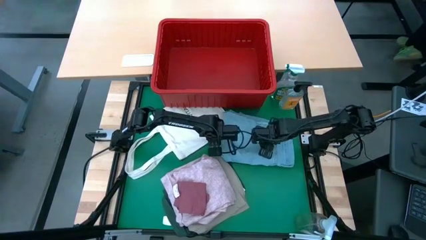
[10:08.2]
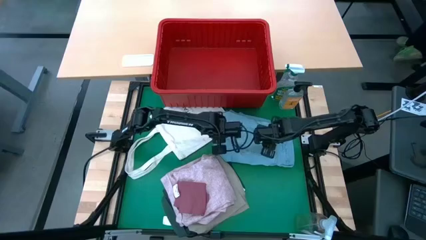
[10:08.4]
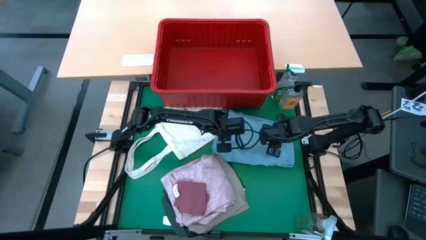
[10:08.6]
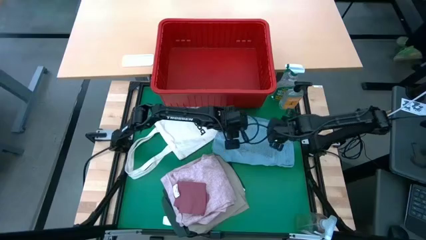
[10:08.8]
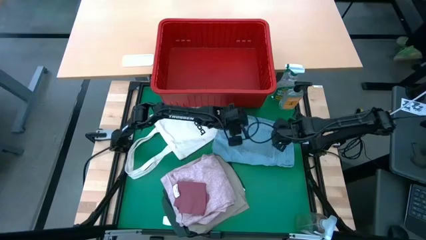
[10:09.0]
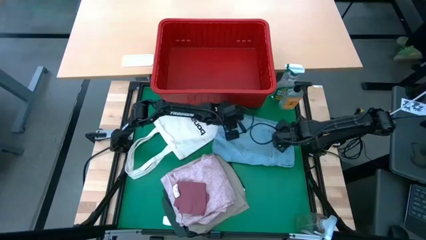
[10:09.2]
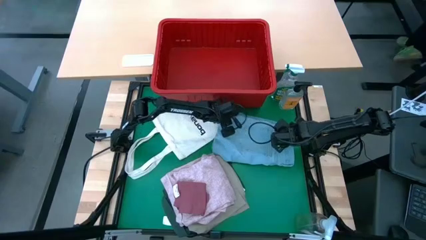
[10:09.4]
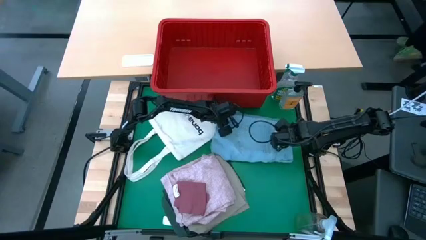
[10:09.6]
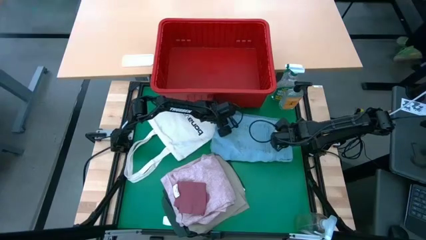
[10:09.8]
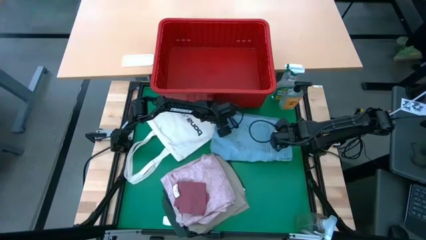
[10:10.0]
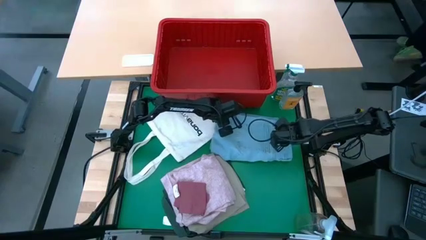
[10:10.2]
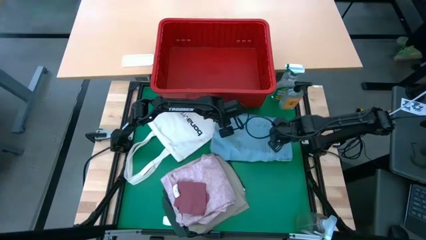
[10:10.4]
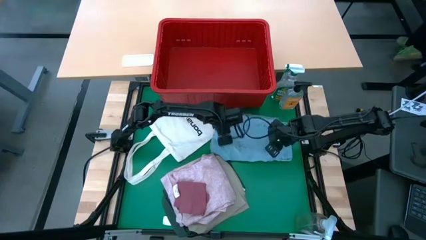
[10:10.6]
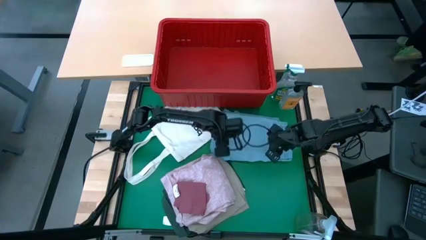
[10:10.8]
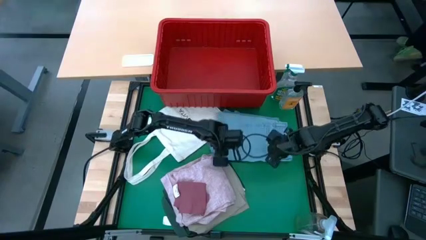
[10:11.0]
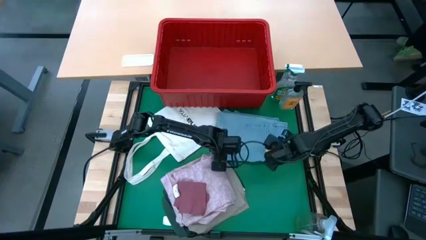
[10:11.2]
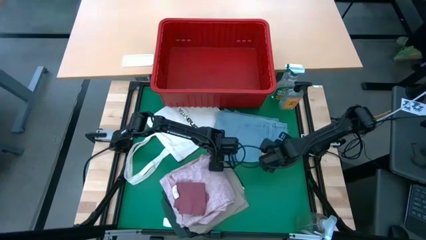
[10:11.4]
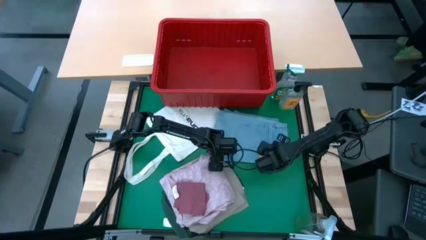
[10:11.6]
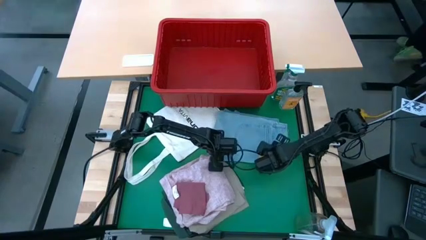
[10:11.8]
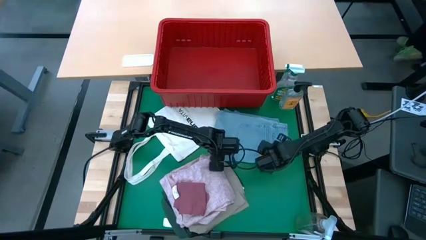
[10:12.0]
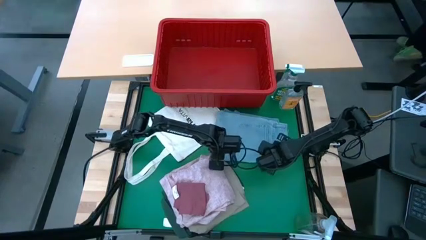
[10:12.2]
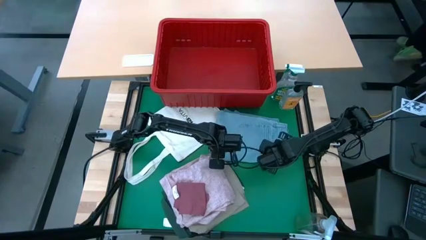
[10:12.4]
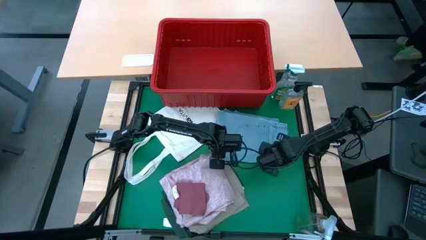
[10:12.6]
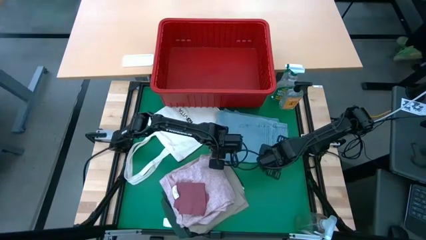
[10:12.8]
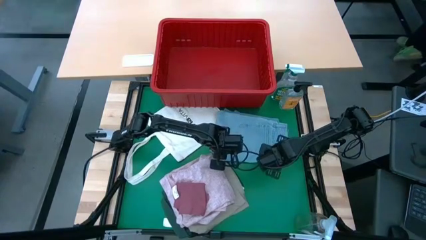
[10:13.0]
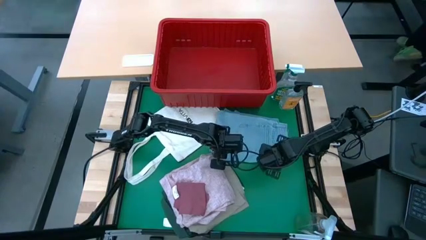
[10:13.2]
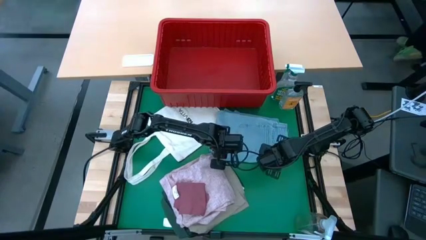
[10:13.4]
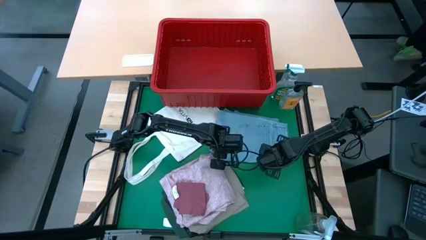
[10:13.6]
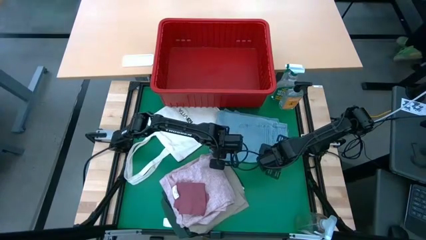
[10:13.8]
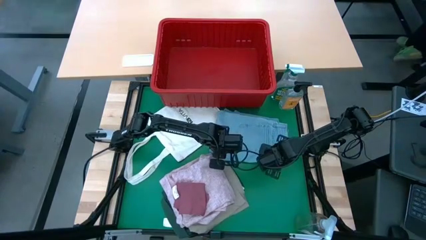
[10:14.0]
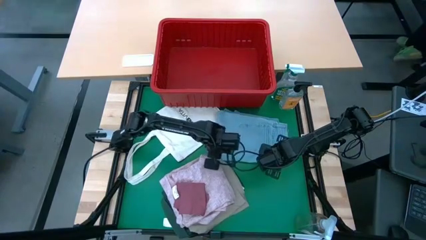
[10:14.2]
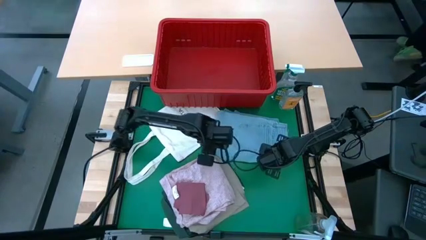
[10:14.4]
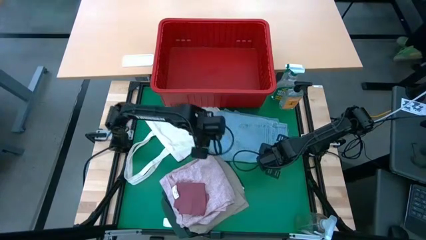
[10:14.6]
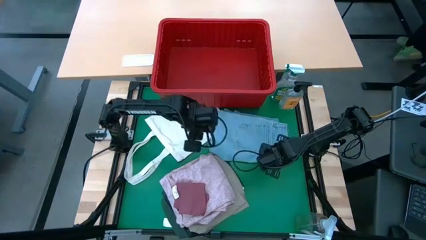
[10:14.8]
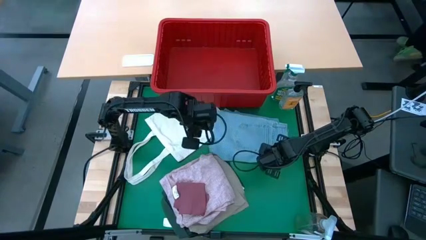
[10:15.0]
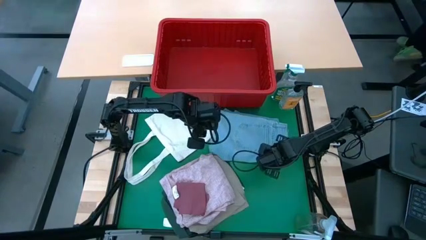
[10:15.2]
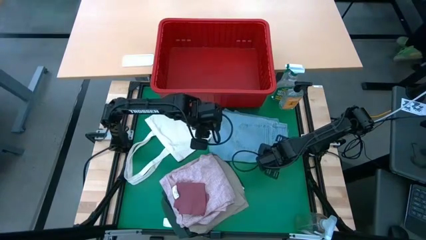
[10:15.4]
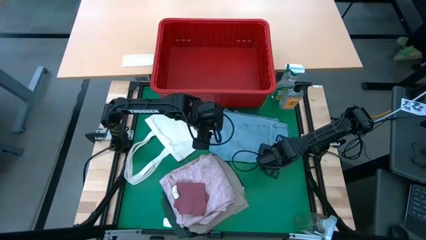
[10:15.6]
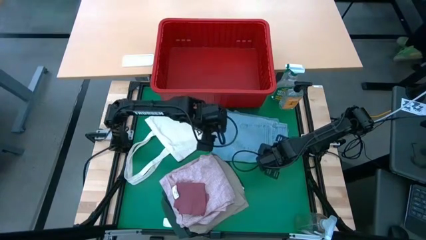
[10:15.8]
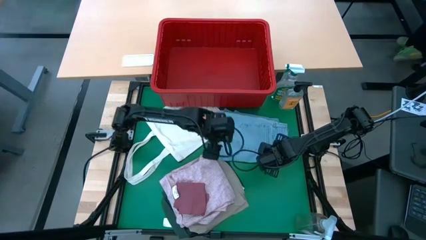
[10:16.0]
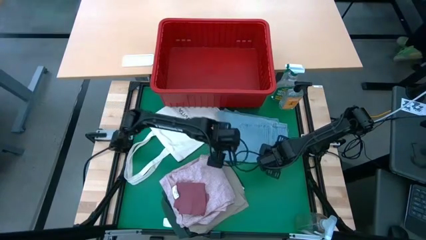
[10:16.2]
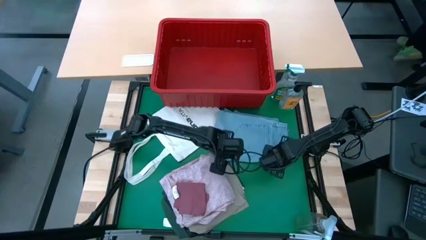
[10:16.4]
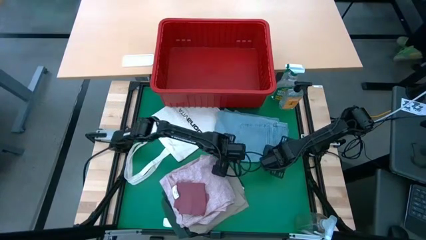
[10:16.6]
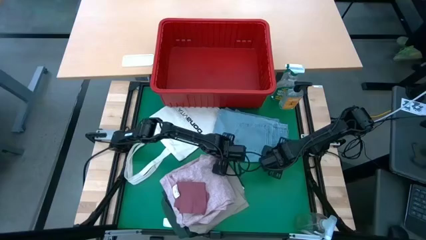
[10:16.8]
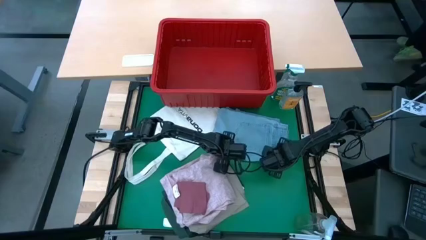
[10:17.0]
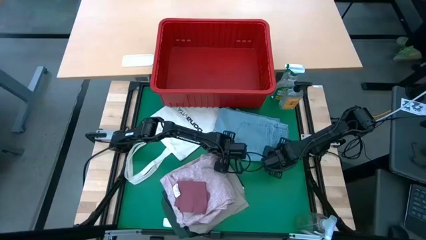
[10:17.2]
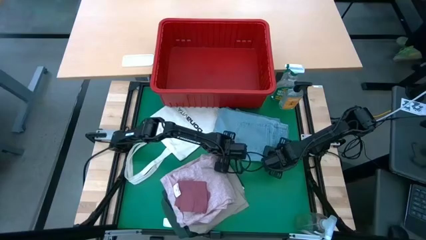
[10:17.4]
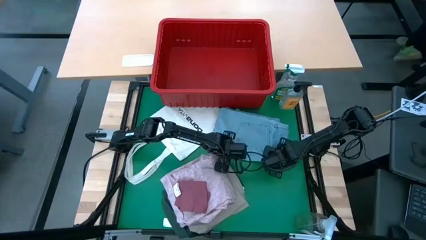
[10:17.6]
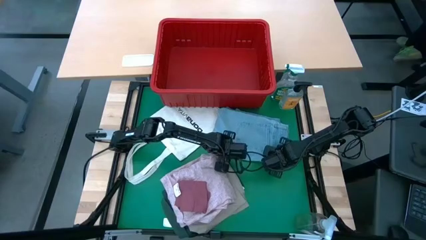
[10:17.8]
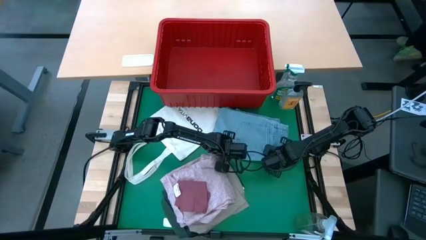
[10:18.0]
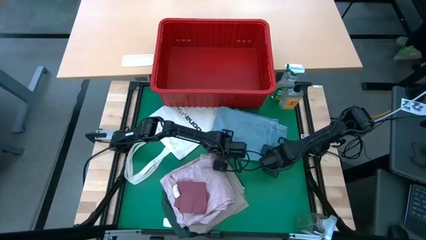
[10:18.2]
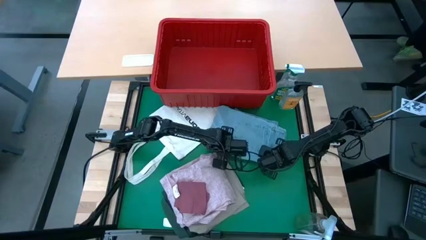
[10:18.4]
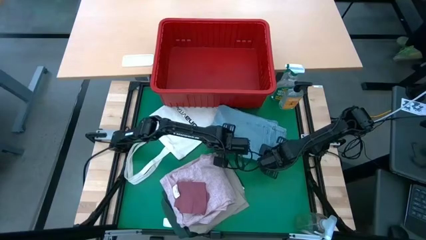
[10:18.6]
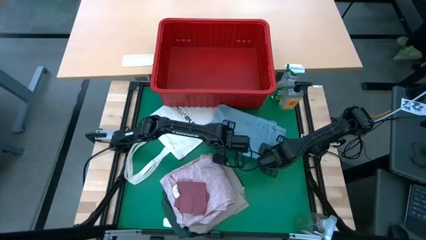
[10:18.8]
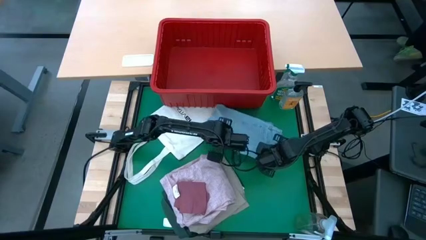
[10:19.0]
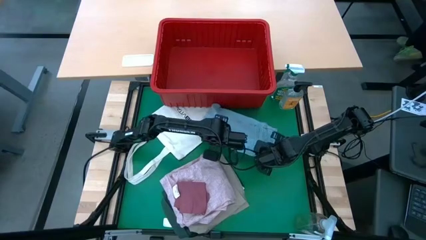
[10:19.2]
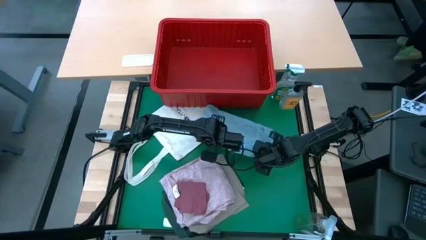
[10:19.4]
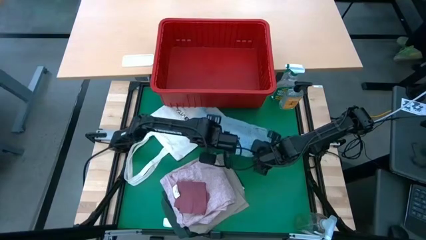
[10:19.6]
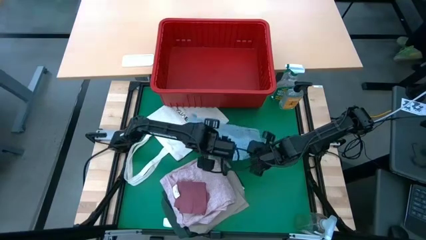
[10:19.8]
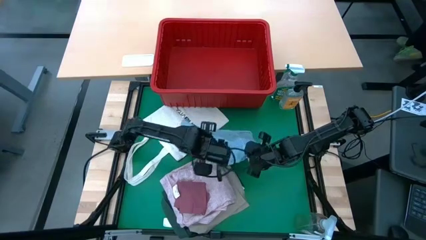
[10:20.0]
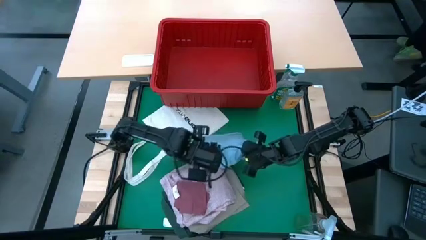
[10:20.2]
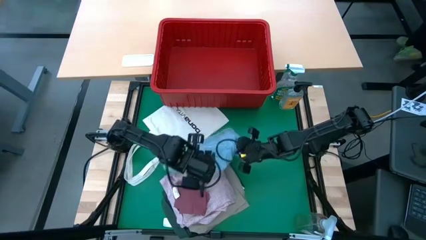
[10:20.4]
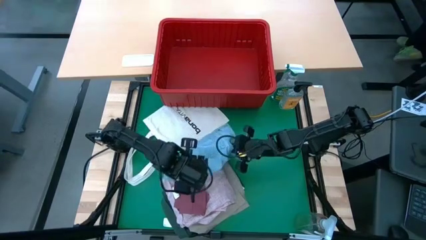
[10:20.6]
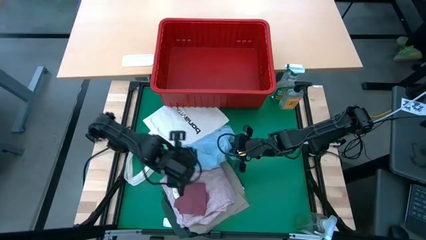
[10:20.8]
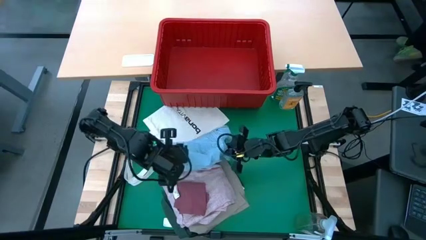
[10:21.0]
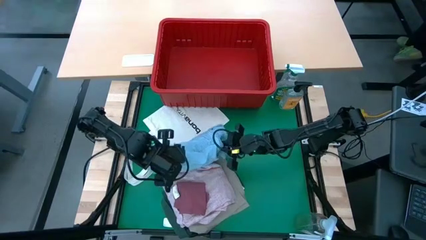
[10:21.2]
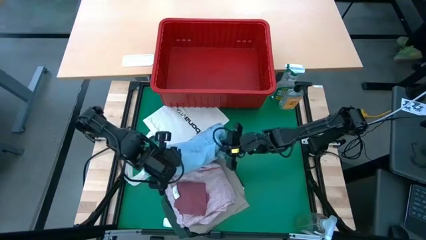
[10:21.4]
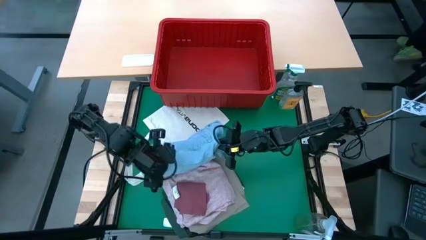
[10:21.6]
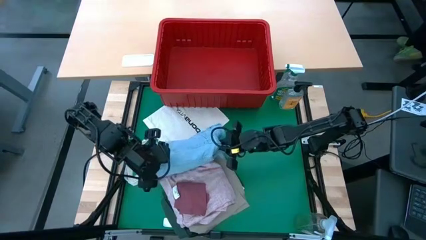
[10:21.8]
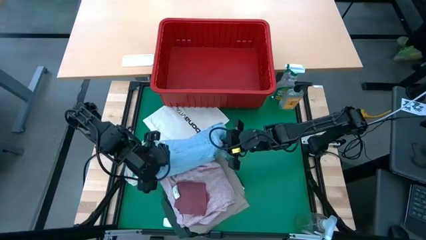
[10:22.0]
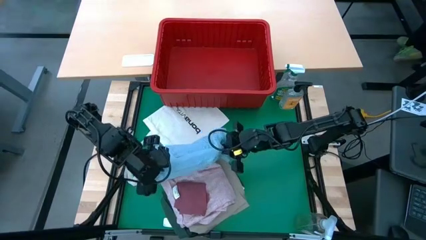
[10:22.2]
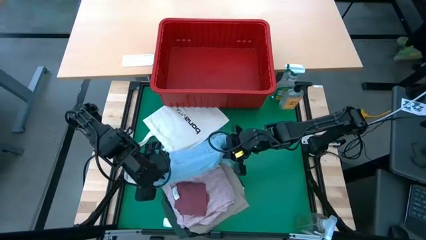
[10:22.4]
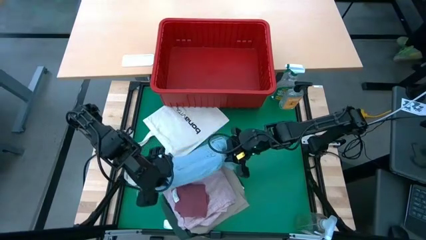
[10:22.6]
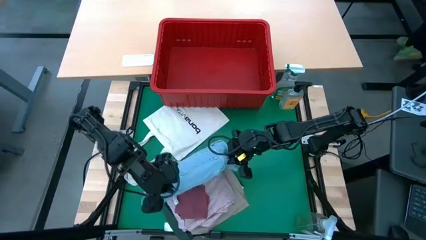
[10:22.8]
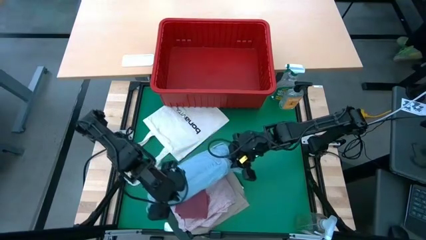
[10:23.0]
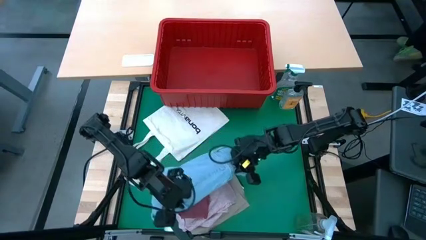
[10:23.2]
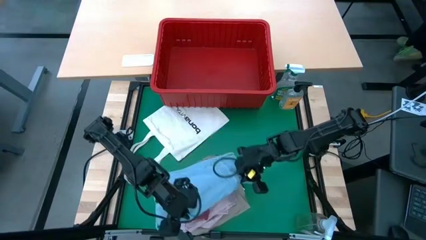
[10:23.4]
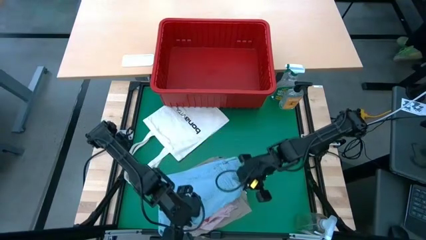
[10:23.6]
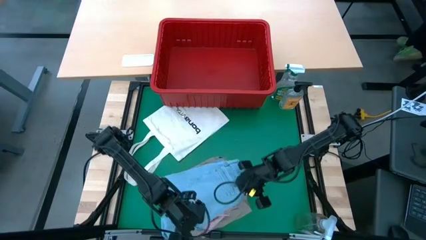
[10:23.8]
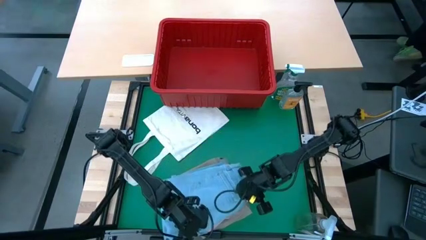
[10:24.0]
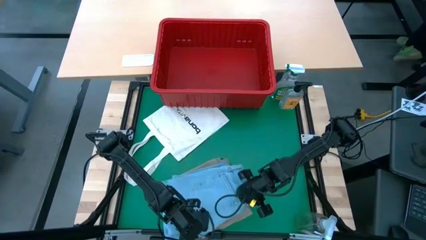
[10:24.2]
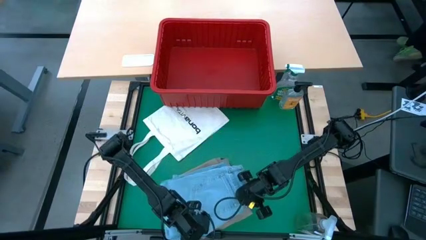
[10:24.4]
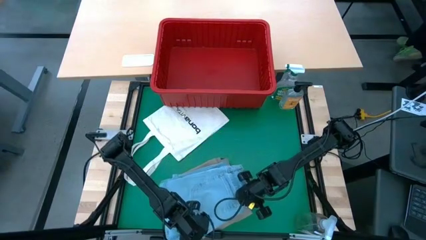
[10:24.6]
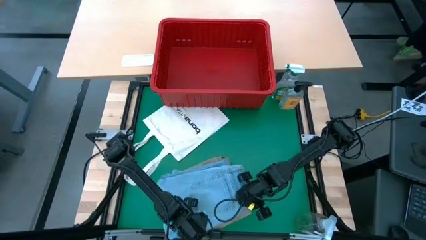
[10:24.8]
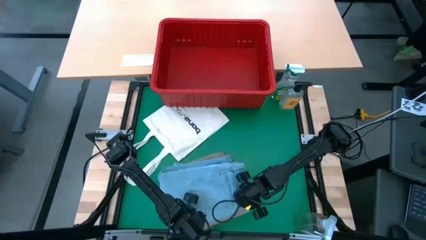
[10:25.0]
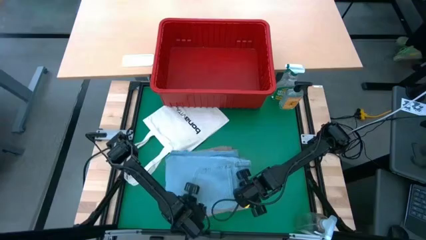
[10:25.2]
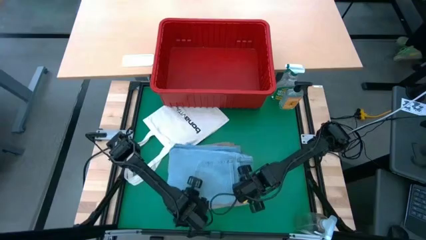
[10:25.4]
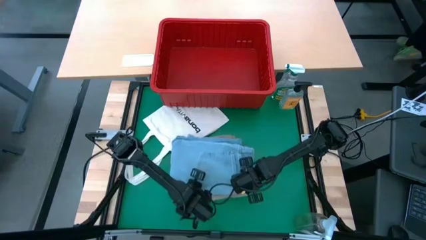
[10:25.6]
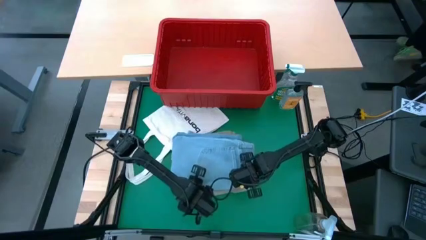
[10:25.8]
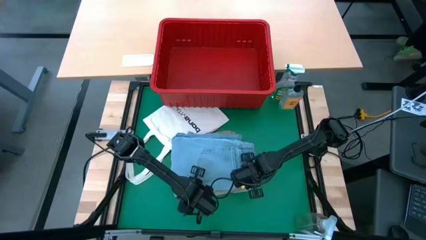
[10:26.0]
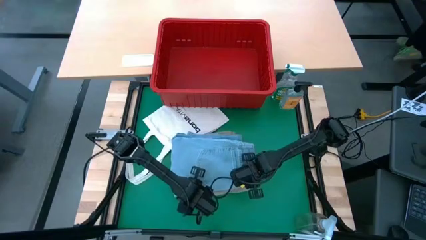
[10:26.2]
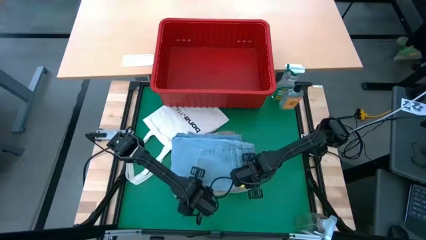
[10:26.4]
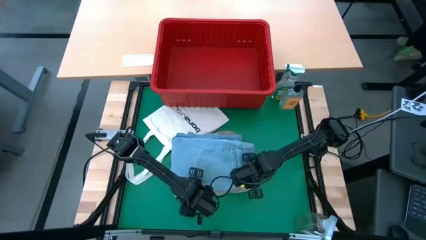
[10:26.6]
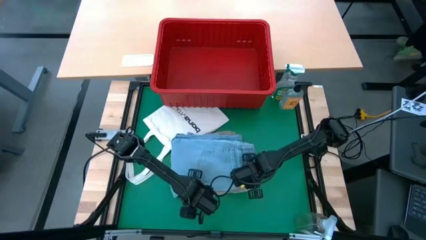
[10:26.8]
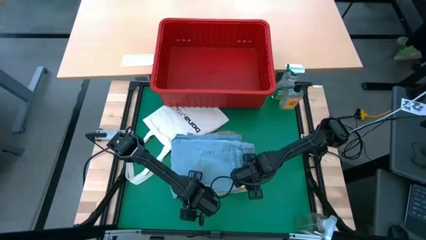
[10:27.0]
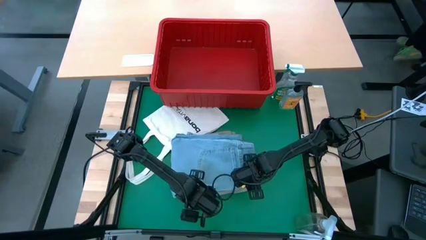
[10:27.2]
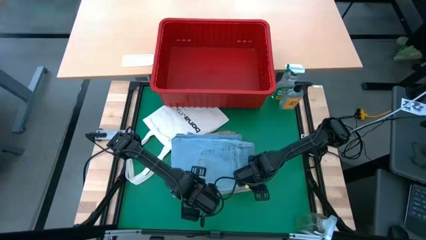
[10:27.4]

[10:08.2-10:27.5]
Task: Fold laundry
Fold the blue jeans
